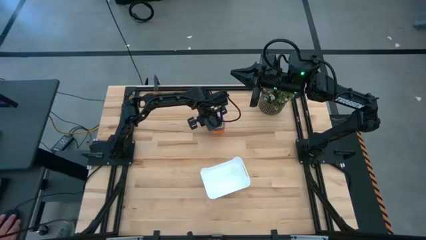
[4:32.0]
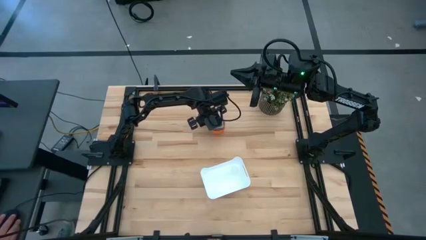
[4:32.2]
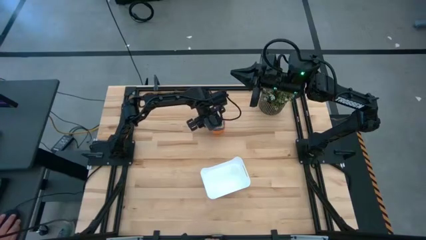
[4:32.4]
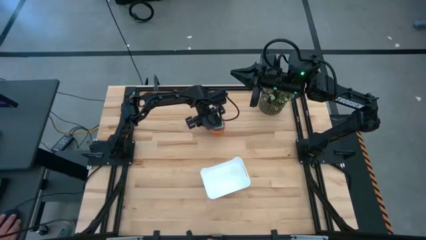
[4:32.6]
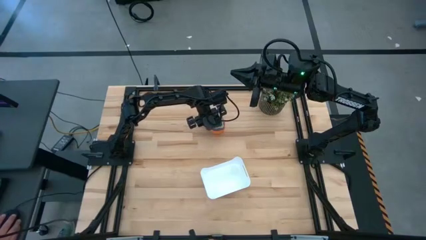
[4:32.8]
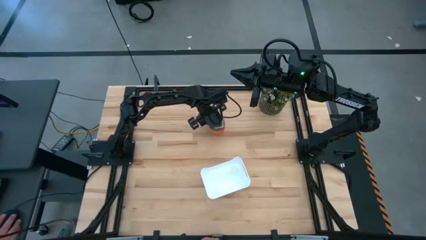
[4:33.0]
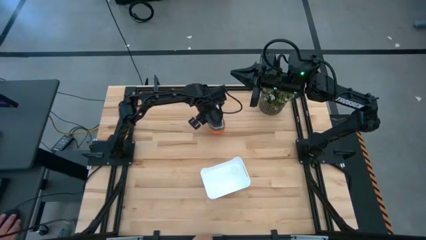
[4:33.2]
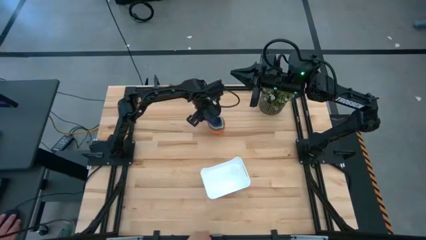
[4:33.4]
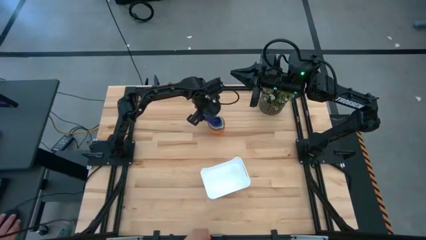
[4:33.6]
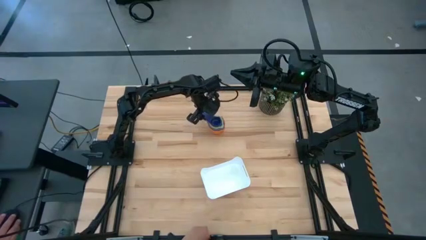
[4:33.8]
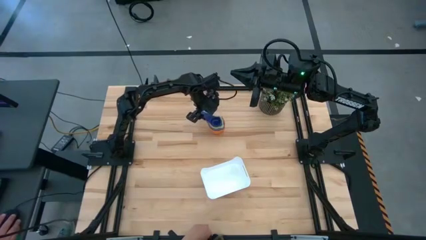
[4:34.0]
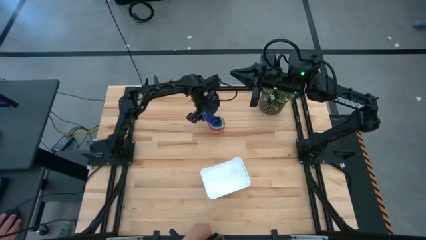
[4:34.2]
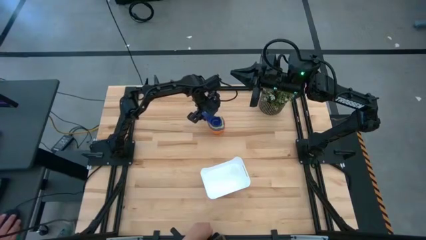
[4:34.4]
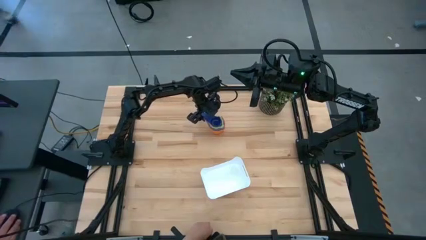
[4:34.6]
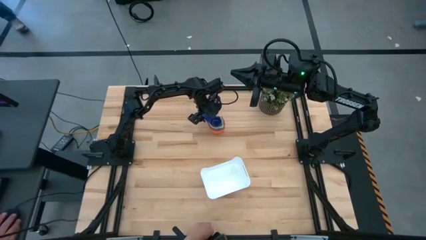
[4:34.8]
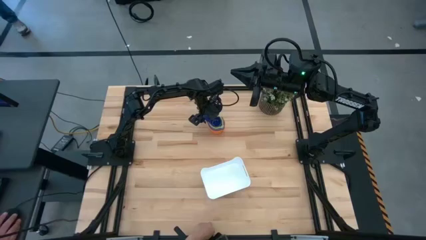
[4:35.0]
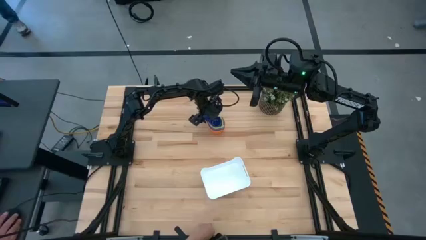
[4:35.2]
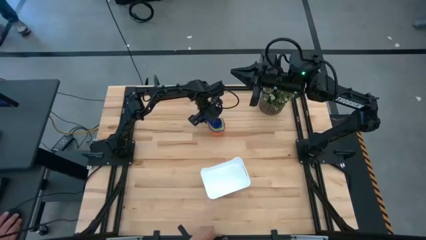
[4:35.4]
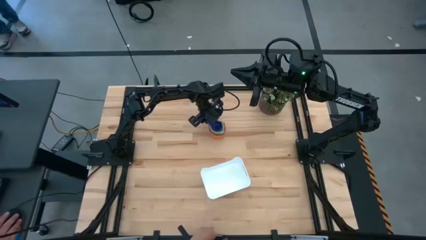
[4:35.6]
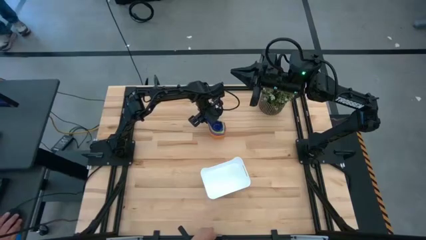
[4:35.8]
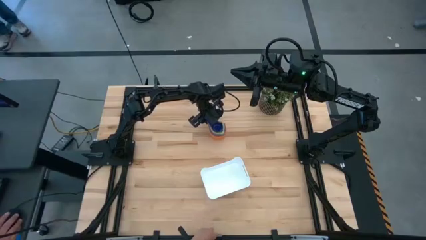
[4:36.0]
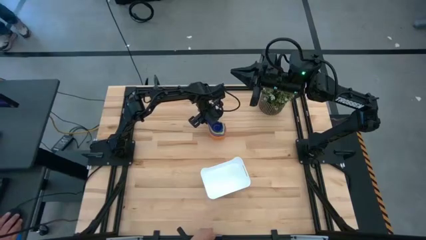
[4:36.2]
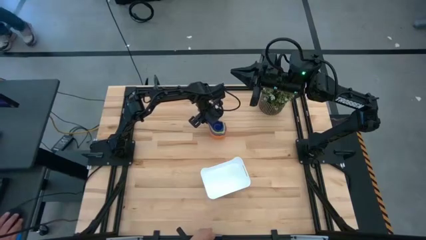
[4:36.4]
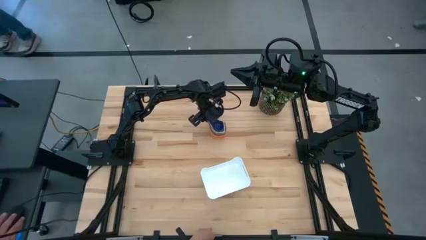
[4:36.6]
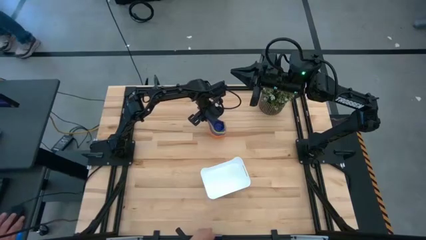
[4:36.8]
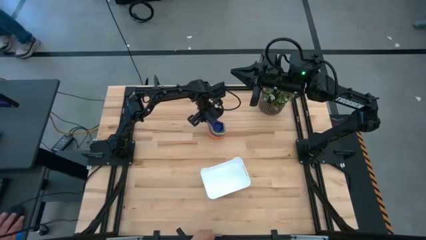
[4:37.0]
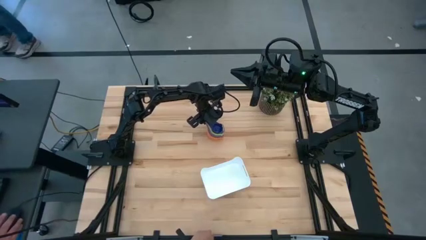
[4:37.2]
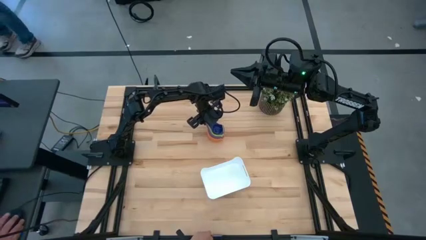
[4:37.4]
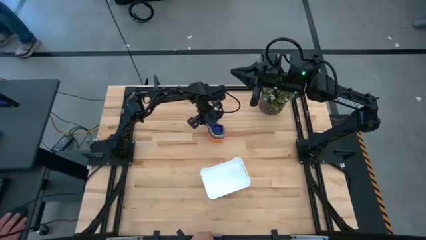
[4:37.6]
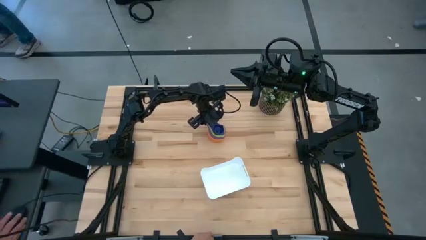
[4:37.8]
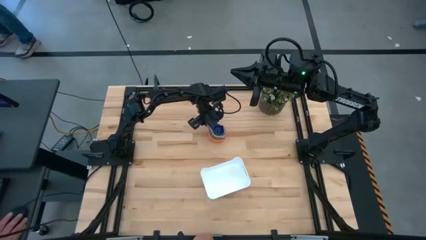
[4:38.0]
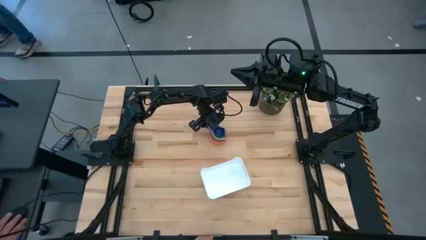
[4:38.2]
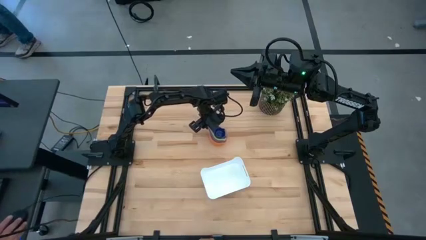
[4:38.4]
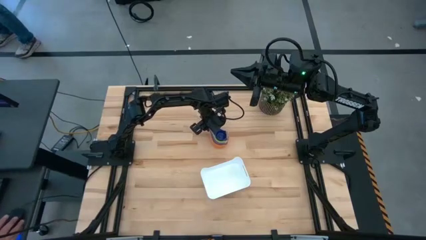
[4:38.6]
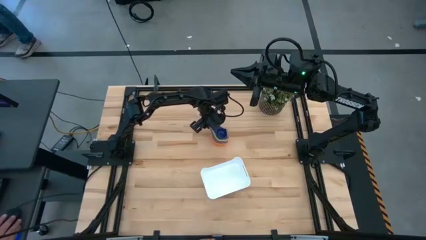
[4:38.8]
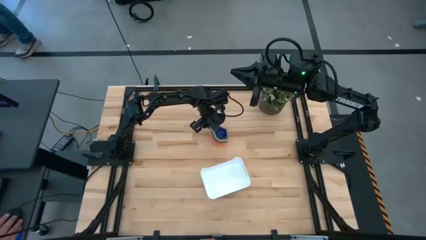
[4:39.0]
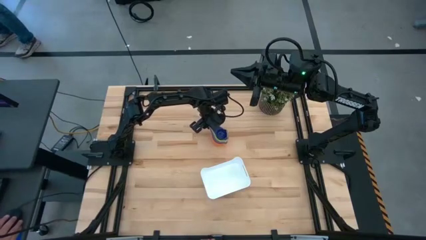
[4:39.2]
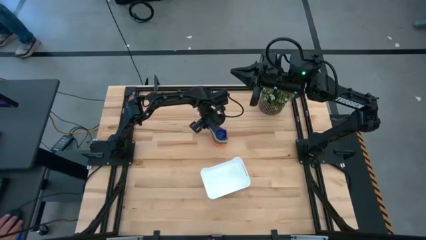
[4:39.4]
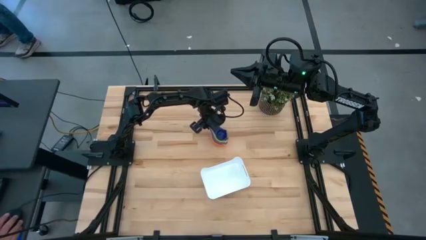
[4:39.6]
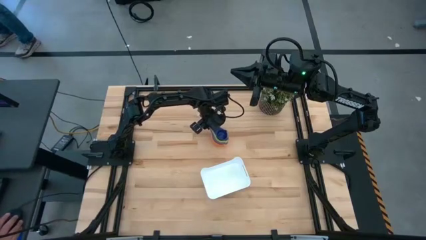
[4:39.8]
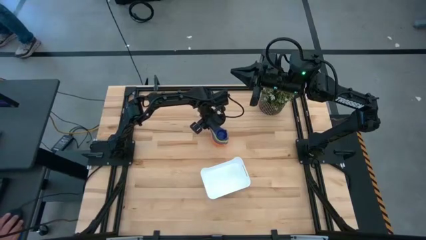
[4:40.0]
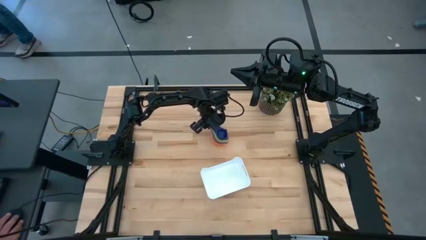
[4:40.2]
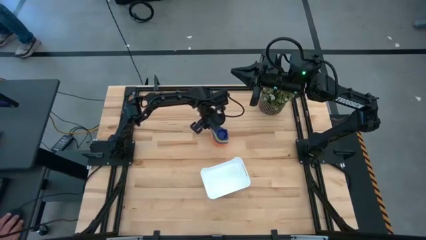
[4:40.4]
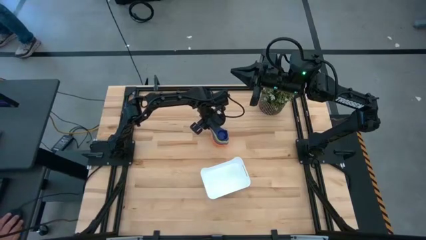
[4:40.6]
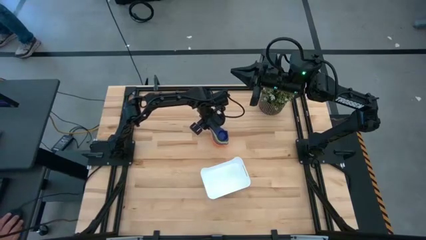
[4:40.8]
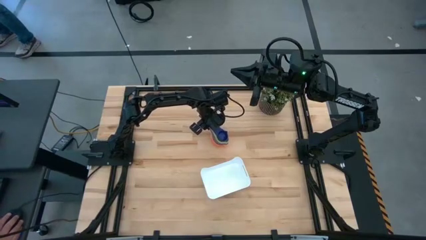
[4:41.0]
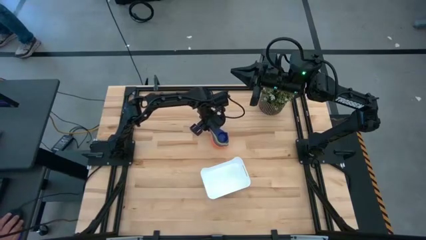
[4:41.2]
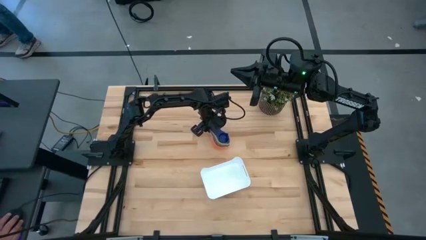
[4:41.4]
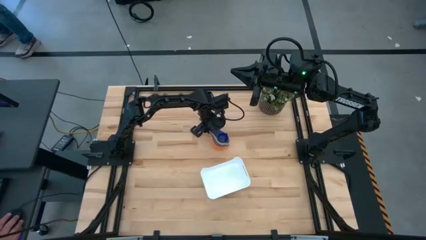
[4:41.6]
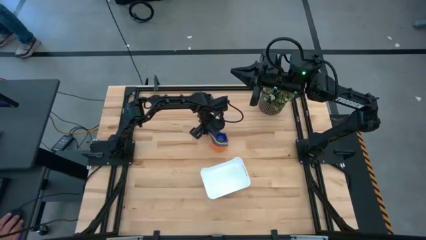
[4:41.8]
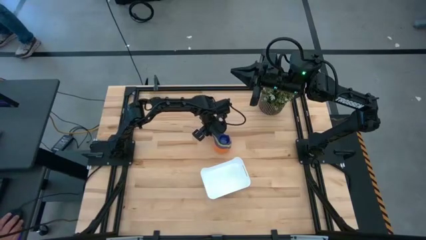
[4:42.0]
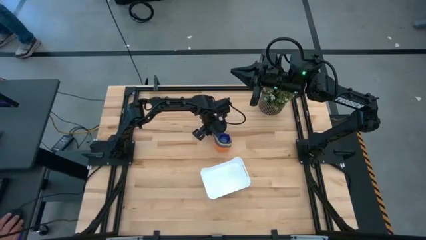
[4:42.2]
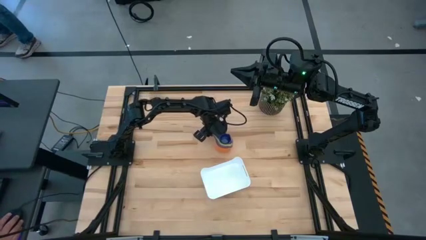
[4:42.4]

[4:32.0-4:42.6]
Task: Nest measuring cups in basket
Put the nested measuring cups into the white bin

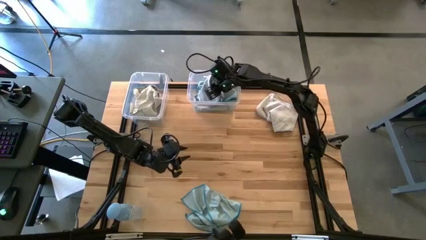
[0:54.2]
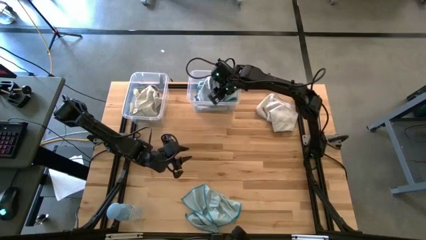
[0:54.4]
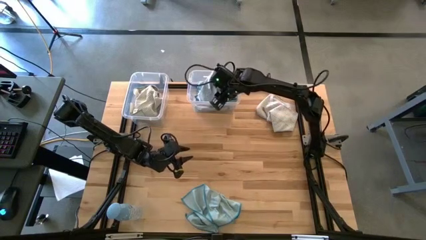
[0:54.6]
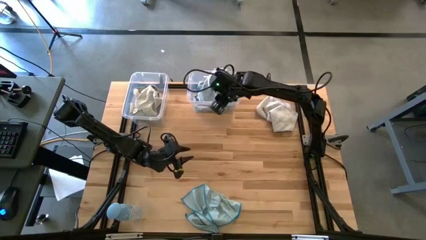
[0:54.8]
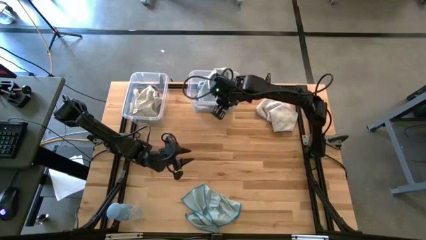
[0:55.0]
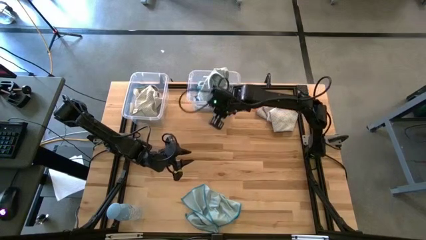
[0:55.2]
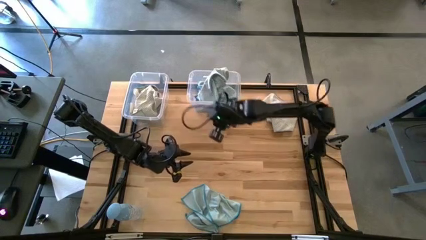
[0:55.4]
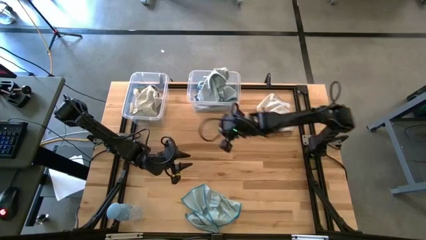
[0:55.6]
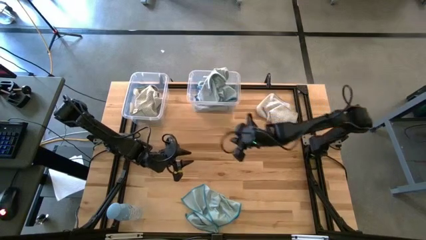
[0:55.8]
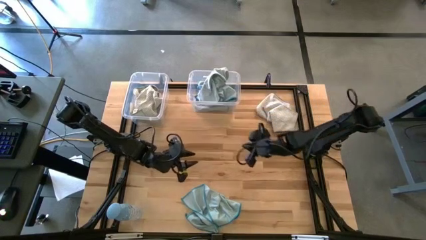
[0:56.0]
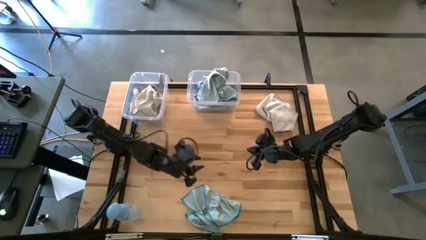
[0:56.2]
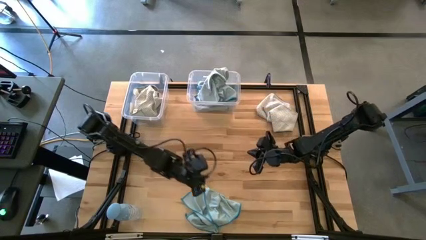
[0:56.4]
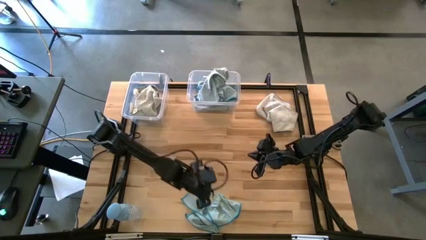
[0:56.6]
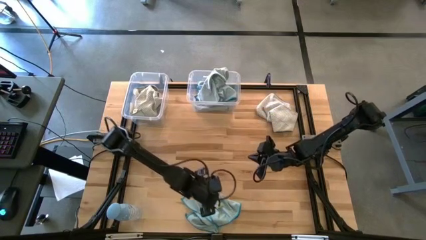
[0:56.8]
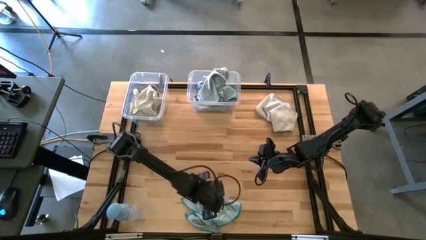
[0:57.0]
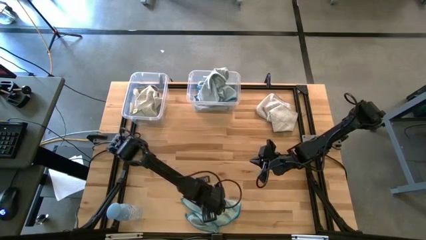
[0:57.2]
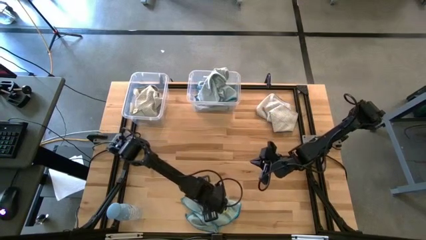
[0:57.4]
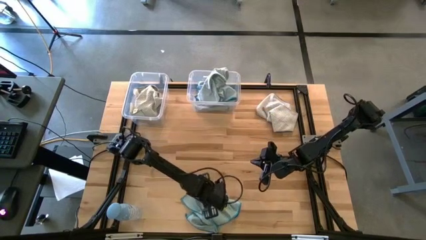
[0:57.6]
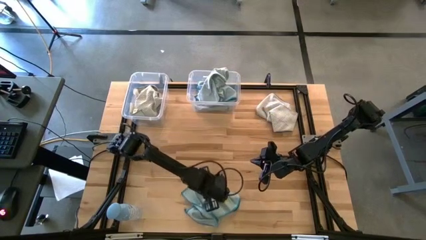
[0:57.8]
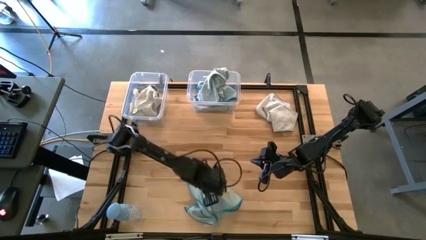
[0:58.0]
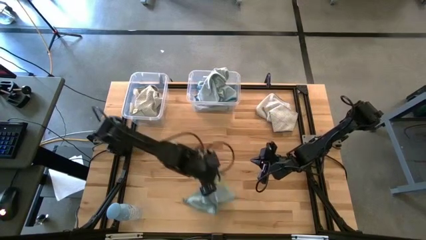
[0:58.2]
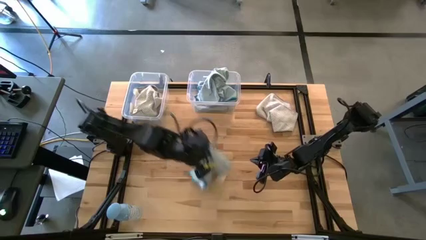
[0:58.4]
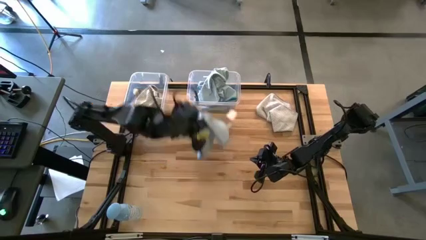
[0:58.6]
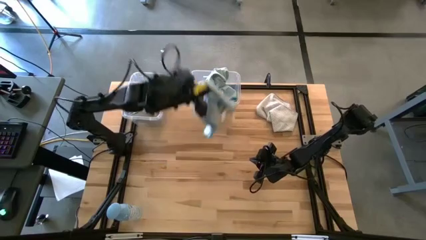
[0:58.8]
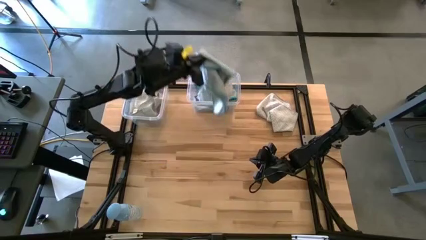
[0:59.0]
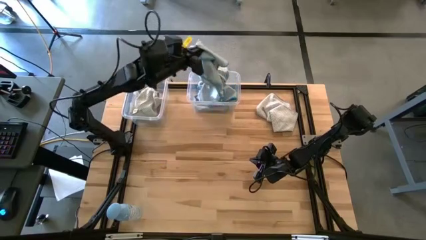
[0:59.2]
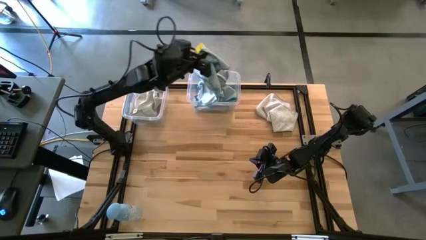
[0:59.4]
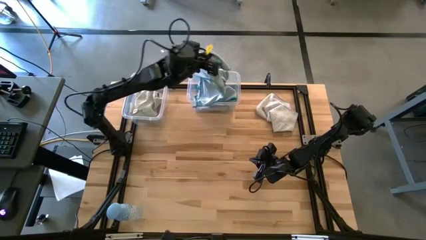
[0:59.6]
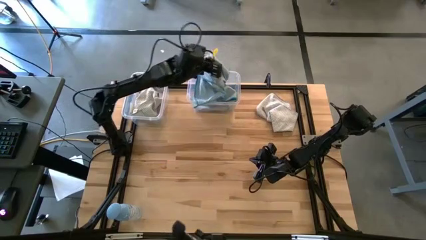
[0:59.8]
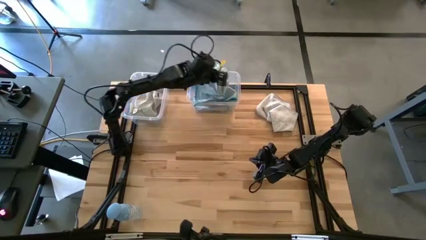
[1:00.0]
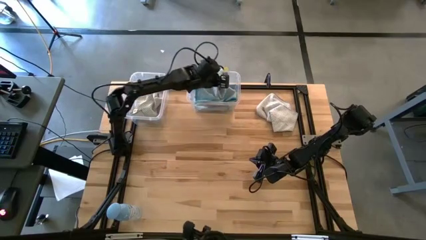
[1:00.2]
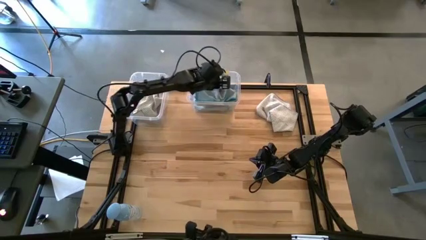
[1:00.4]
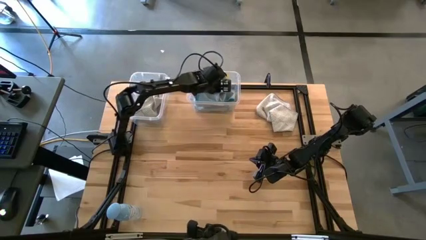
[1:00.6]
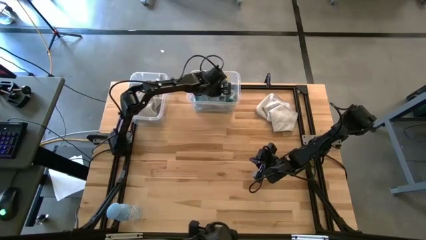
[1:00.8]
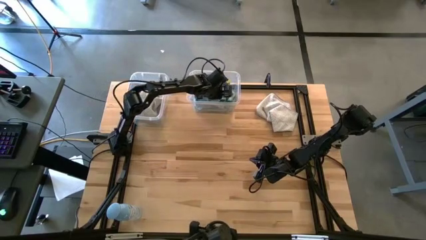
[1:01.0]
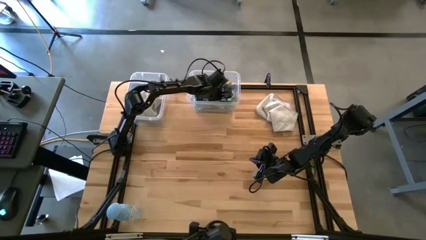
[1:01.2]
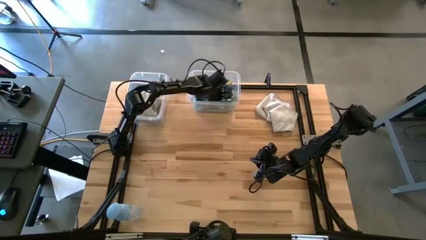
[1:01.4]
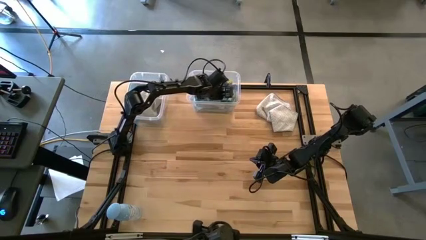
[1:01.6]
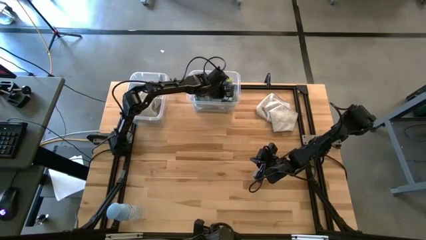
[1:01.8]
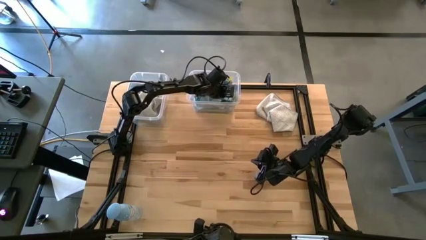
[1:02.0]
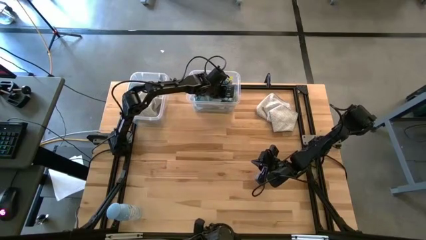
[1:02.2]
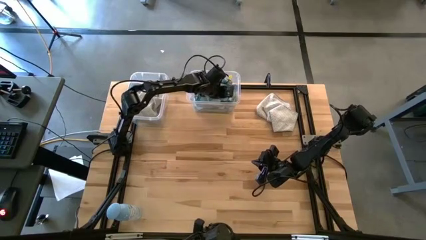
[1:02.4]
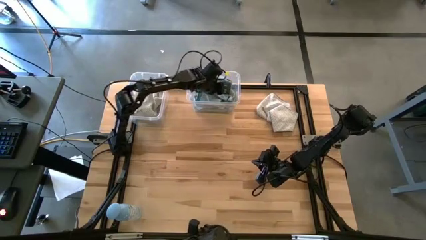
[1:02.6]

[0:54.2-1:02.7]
Task: Sort microfiber towel by color & place in baskets
Put the blue microfiber cloth into the right transparent bin
